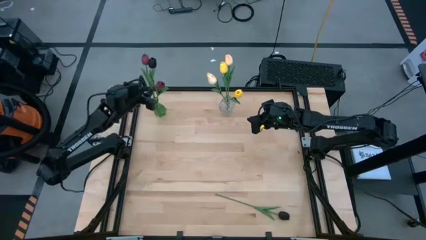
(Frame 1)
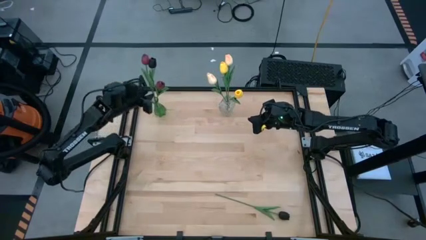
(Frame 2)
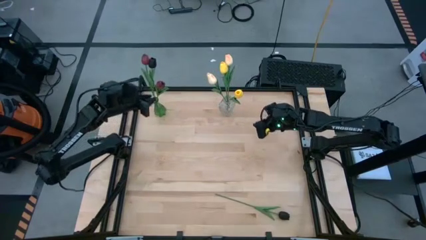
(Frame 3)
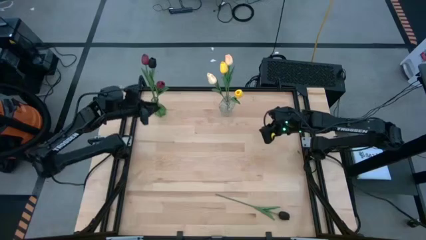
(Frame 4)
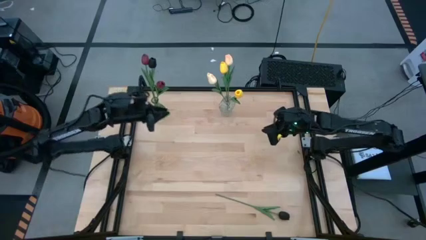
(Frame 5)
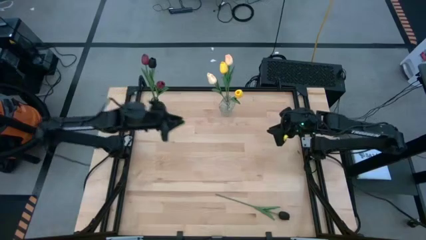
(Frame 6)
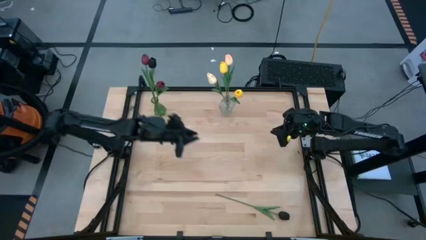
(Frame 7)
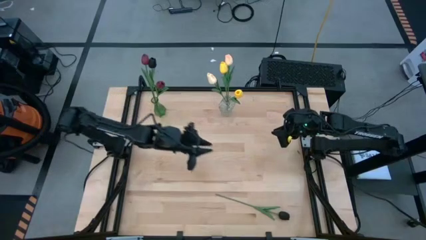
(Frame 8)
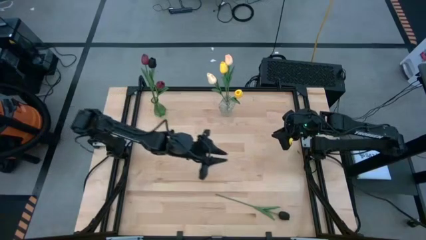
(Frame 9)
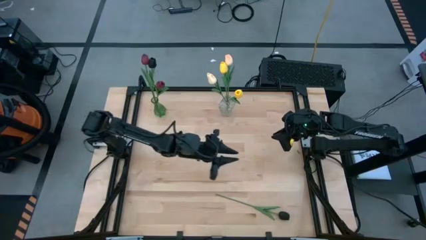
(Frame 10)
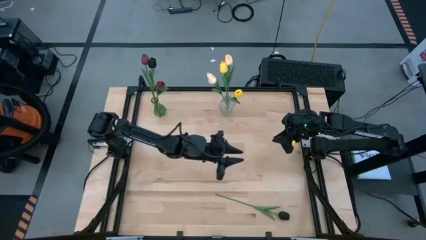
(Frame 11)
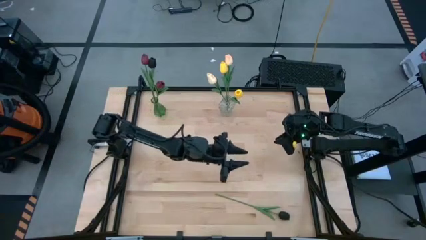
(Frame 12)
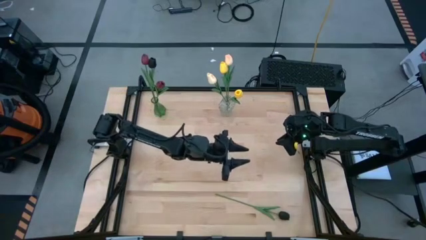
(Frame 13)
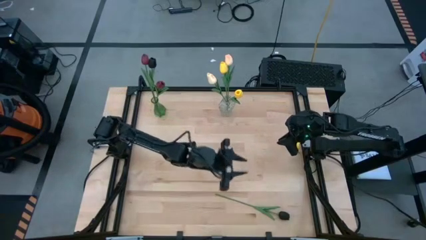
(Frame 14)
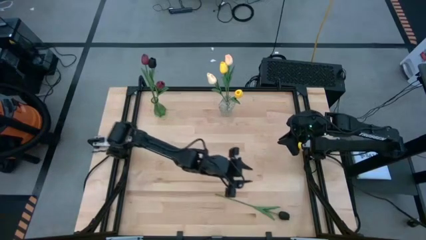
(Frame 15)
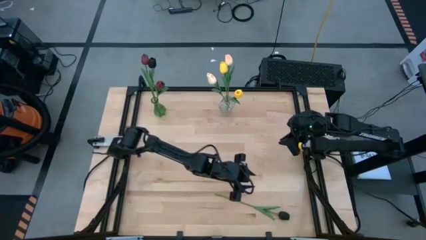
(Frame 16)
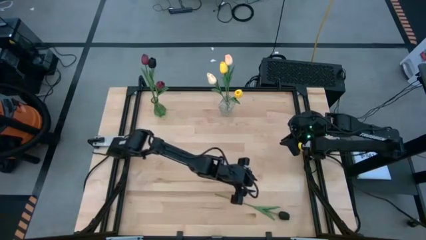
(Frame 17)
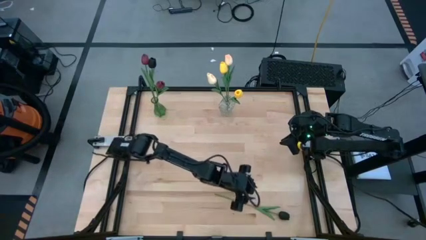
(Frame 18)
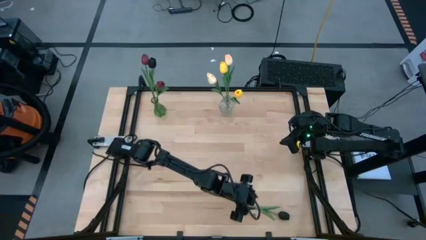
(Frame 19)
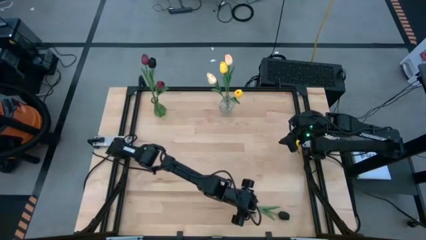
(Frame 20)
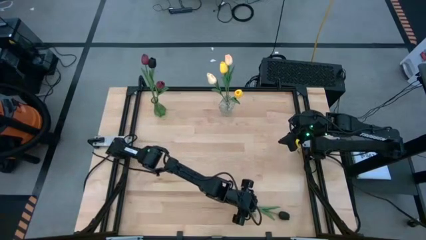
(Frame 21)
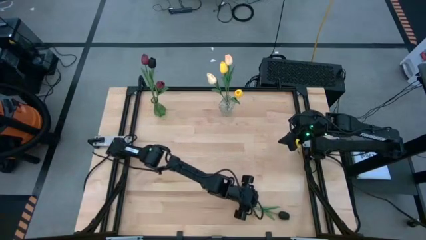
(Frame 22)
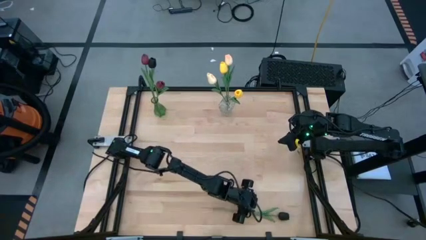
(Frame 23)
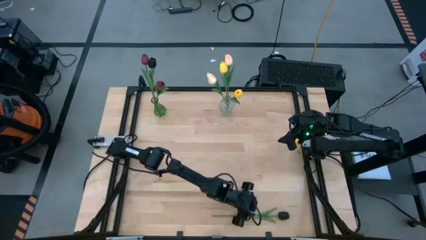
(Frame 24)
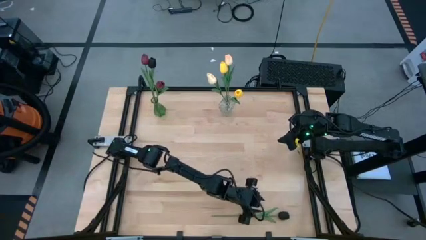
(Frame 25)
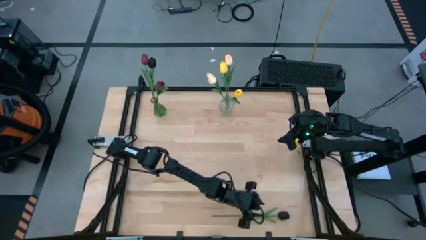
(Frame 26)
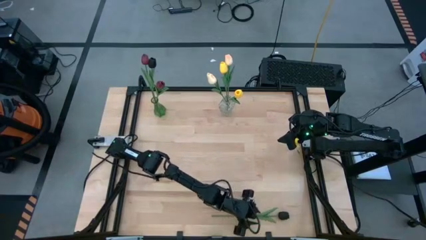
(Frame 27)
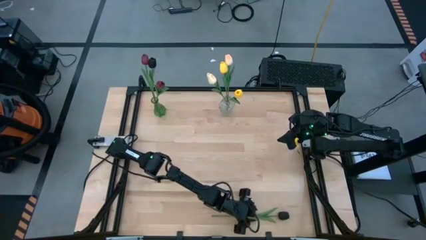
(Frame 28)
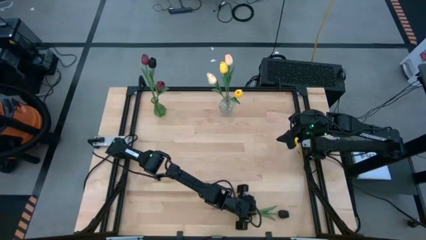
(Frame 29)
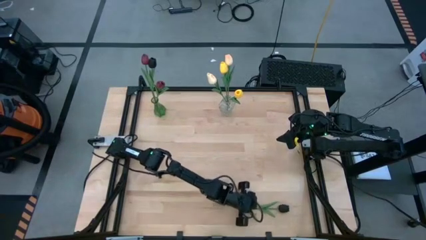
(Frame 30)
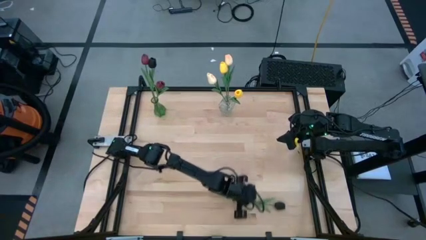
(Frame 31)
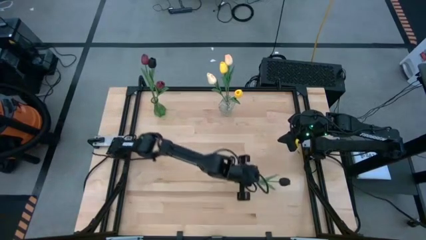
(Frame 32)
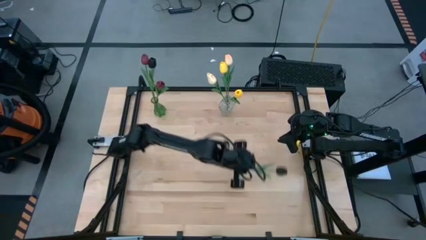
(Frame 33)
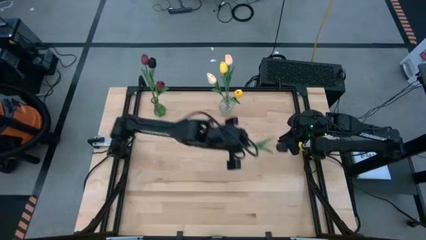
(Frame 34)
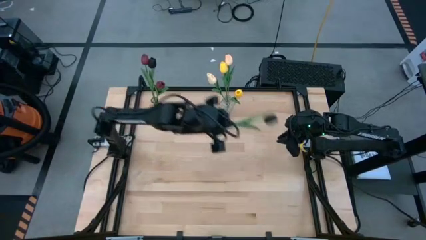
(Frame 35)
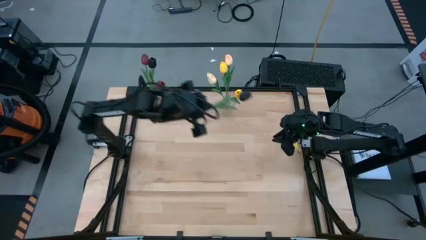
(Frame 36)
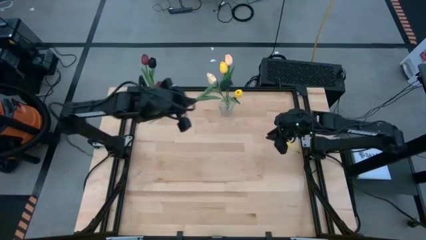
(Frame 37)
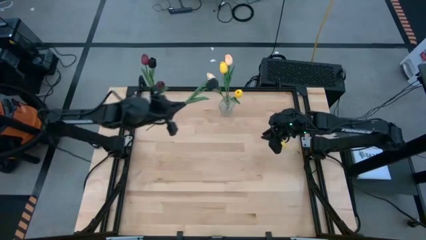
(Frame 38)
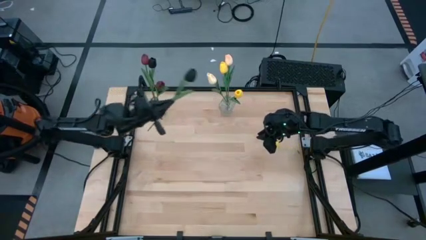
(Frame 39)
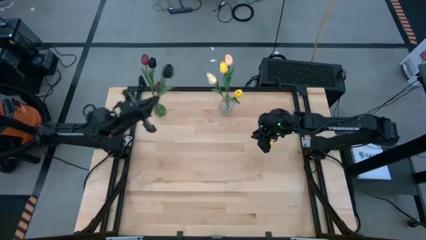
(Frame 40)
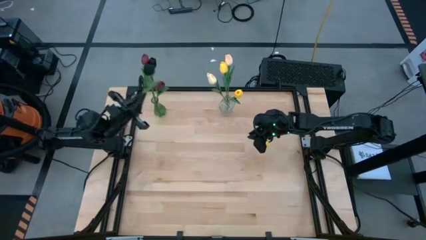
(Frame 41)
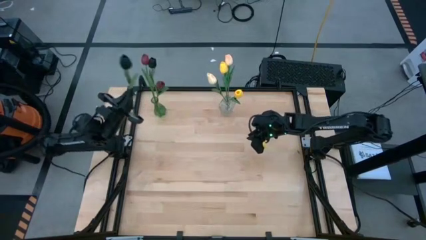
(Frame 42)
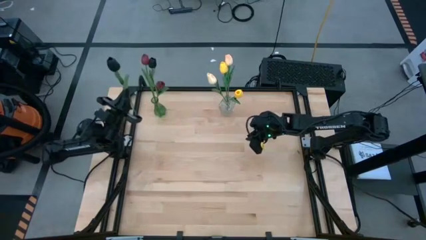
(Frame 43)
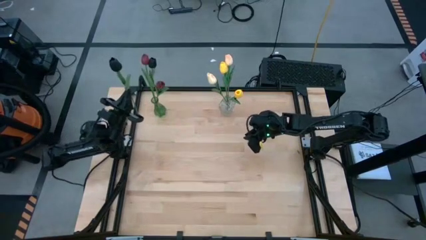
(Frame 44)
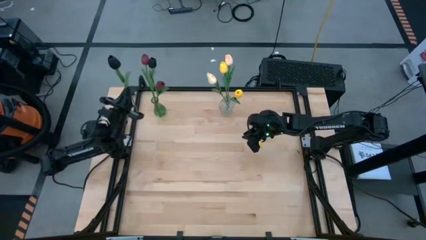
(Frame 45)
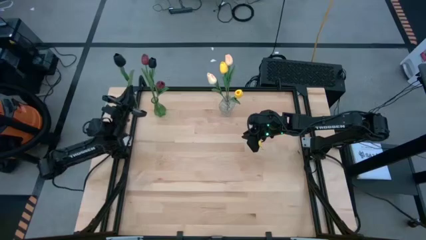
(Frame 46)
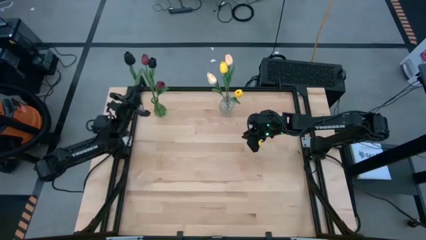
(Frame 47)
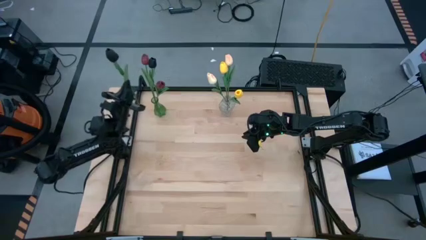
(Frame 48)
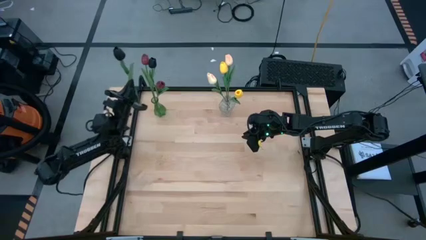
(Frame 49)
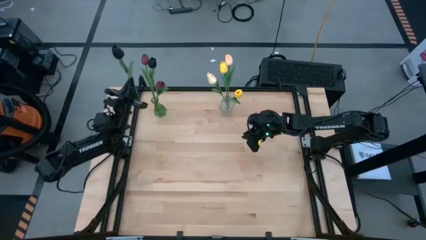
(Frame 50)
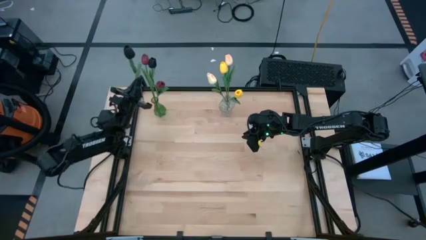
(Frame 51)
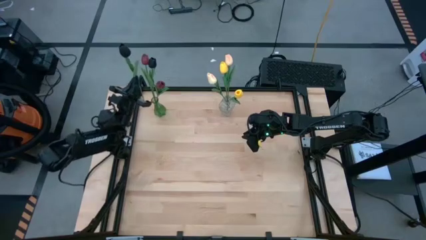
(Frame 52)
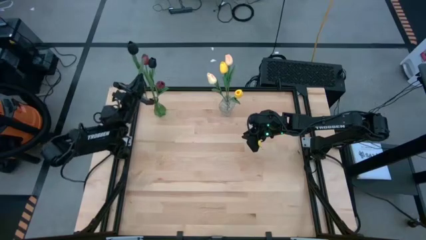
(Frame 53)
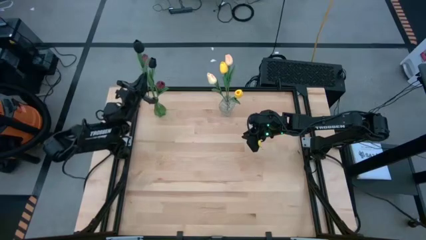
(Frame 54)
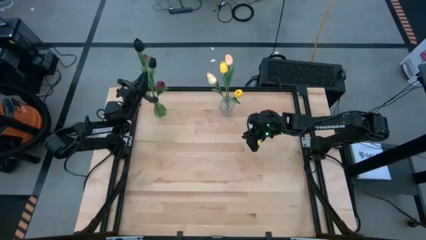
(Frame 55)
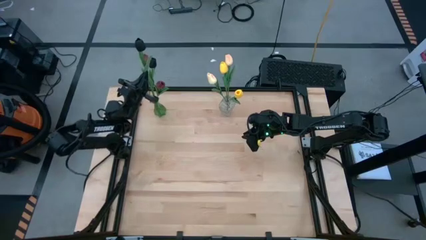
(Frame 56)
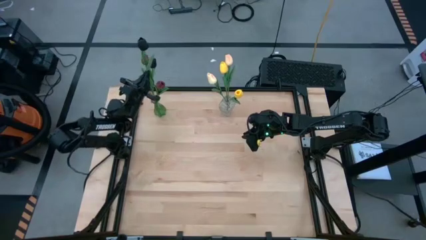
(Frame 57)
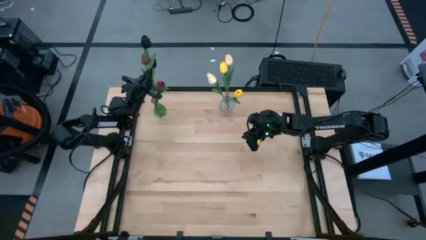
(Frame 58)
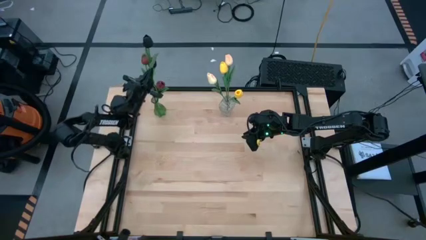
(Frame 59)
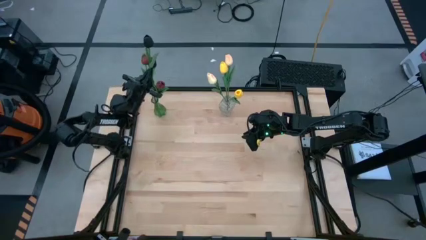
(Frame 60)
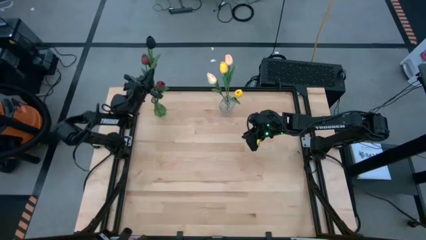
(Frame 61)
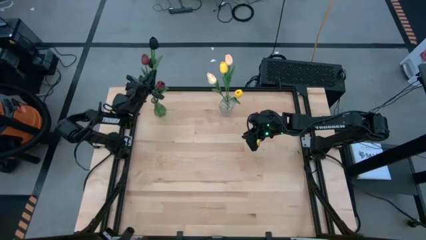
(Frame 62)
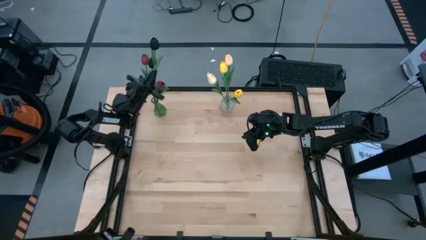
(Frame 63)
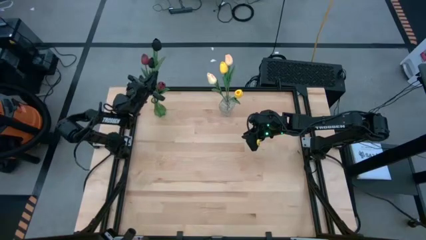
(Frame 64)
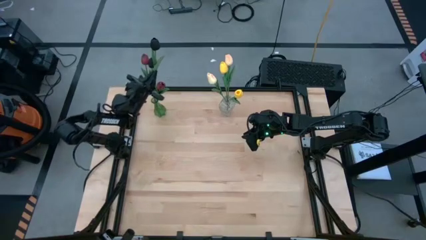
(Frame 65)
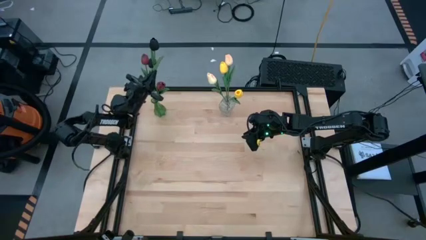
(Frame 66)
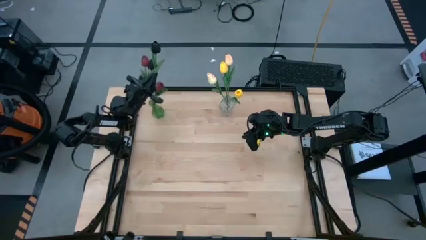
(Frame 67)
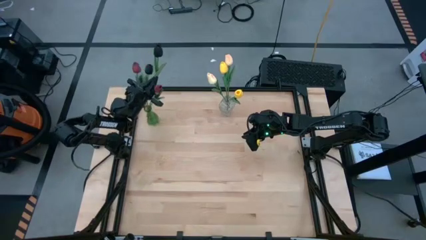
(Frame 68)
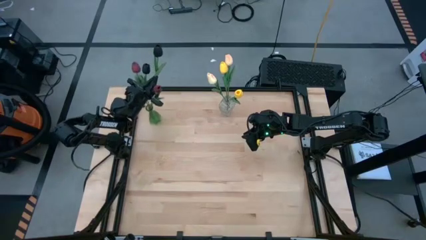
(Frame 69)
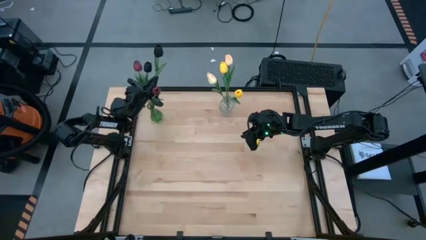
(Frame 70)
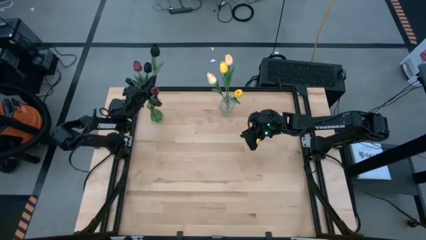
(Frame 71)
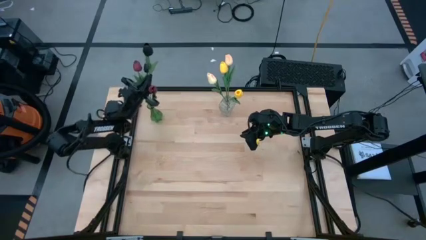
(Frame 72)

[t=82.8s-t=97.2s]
Task: Sort flowers into vase by color
Put the black tulip into the green vase

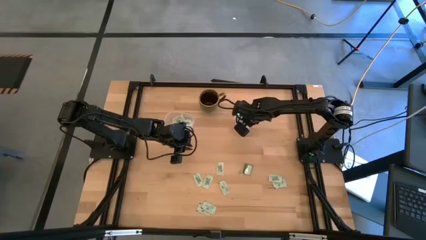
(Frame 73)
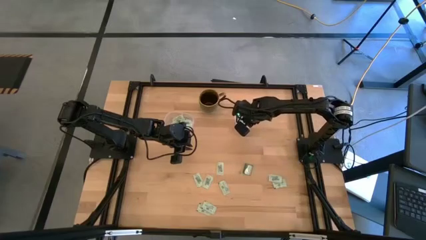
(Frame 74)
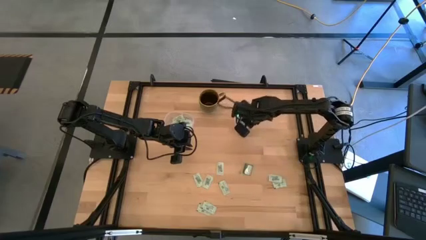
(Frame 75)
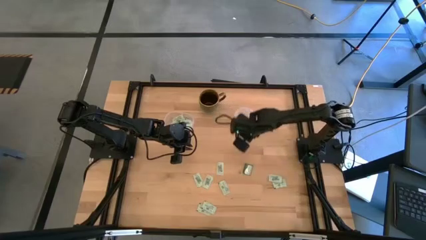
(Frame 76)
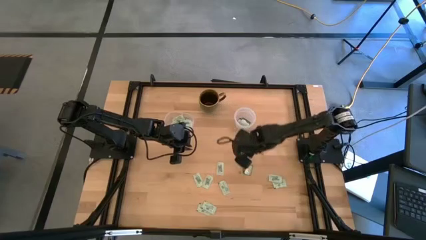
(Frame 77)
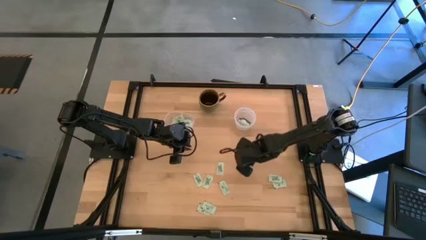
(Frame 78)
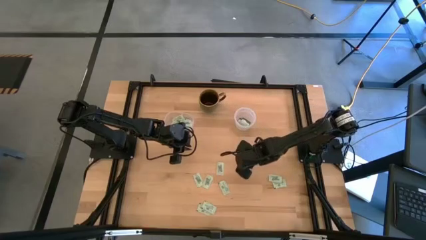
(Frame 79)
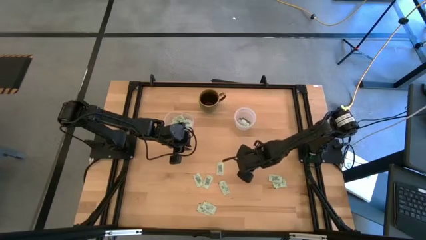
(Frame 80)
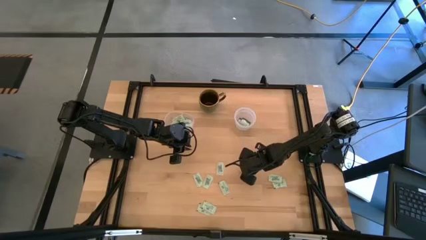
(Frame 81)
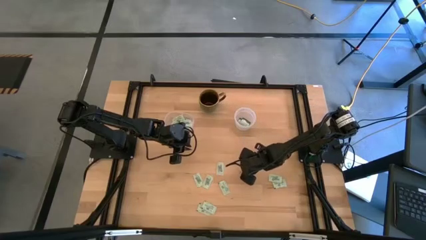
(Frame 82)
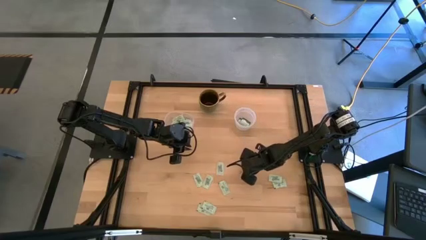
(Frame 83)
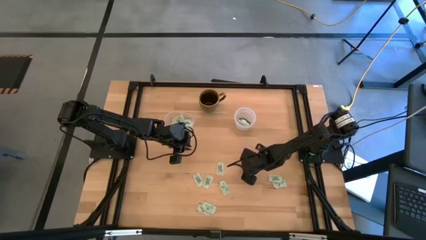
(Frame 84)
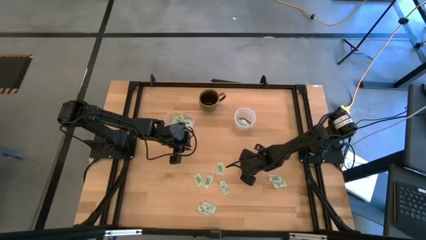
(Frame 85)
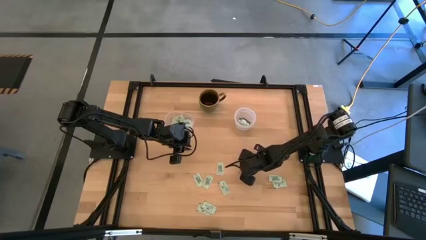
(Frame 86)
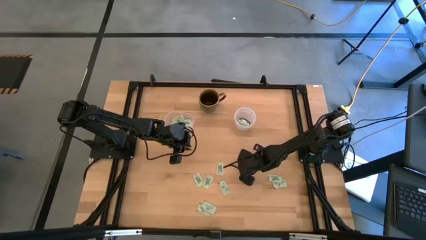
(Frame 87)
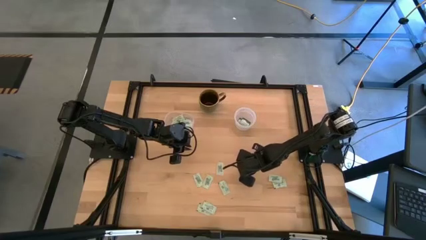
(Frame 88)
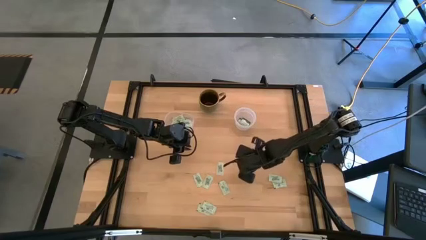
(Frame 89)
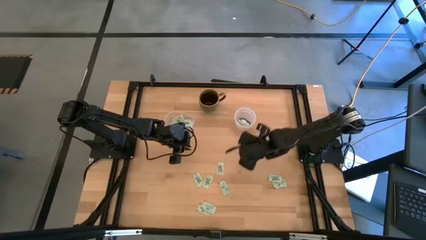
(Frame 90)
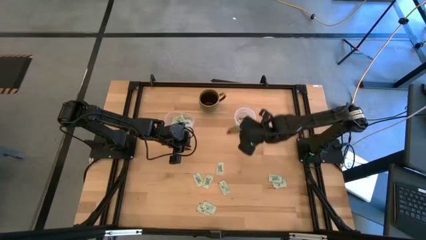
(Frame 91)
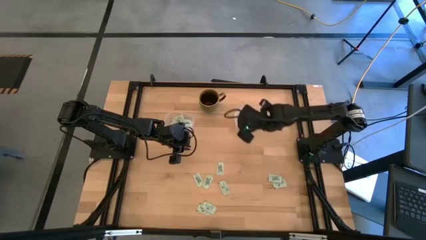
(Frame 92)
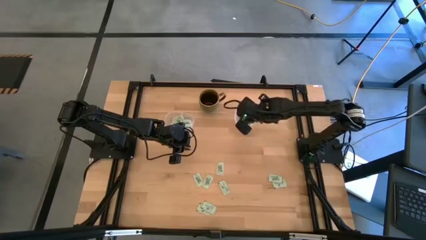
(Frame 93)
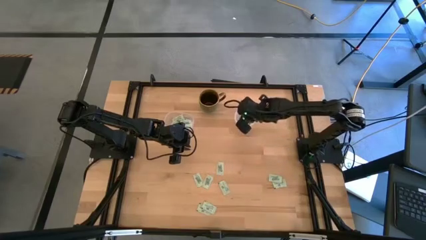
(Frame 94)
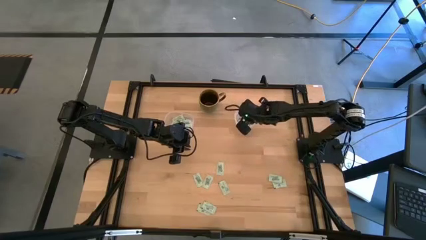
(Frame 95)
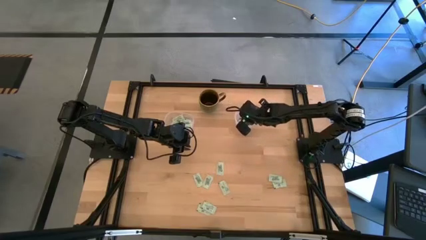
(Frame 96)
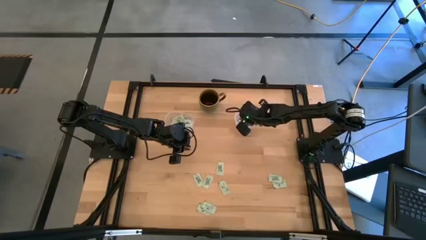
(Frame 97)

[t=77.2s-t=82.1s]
Task: Pick and place Stevia / Truvia into bins
Put the green stevia packet into the right transparent container
